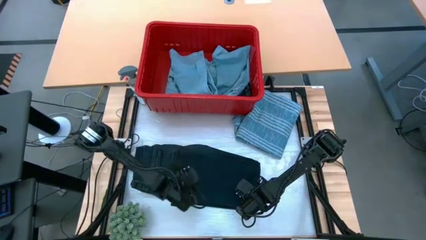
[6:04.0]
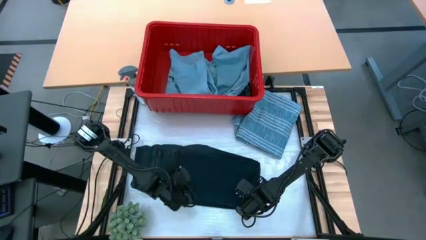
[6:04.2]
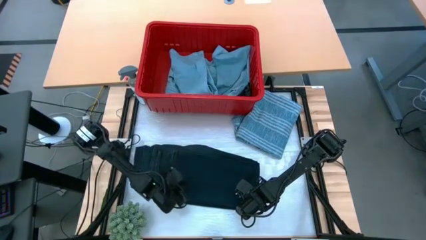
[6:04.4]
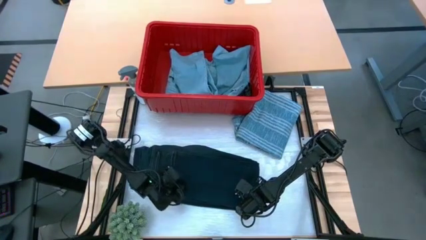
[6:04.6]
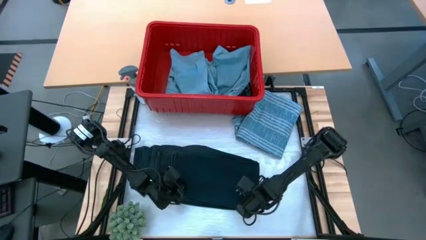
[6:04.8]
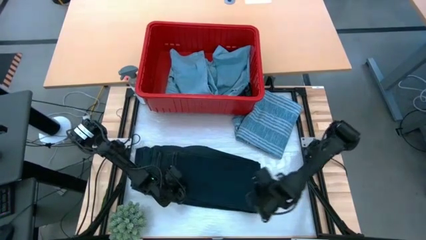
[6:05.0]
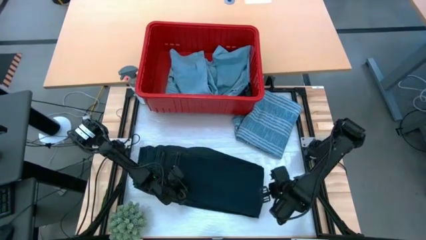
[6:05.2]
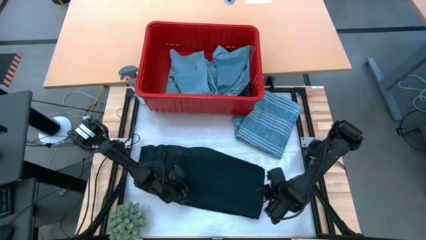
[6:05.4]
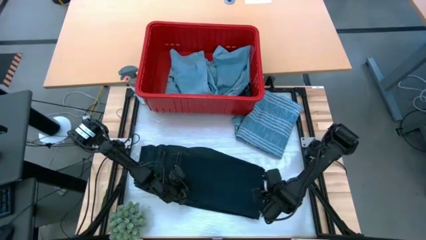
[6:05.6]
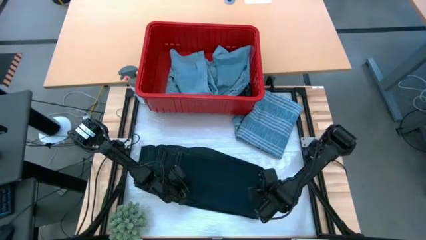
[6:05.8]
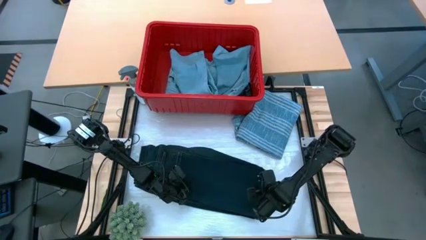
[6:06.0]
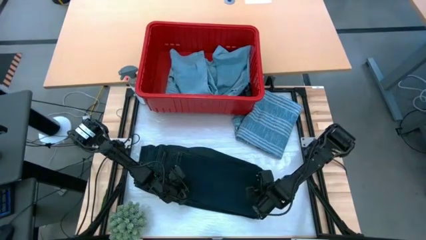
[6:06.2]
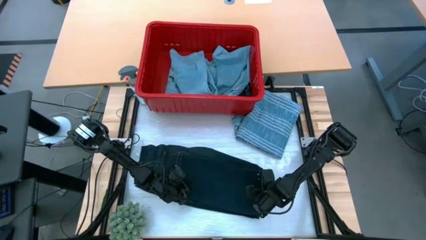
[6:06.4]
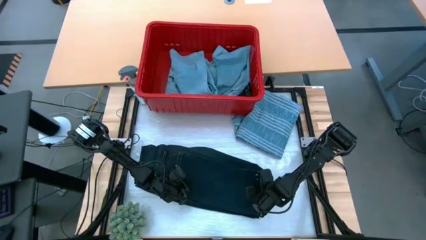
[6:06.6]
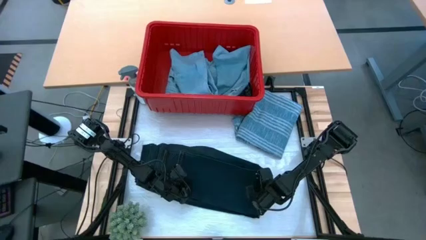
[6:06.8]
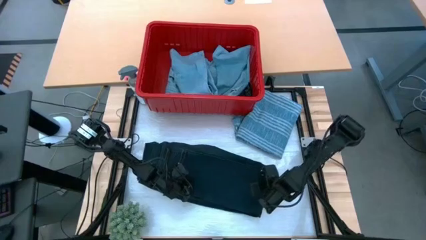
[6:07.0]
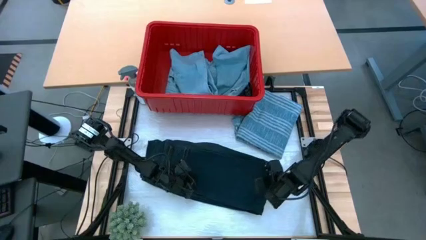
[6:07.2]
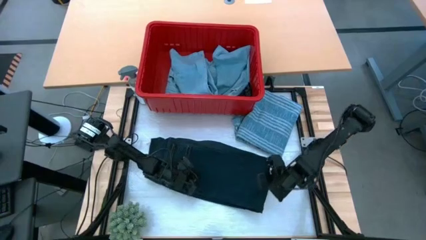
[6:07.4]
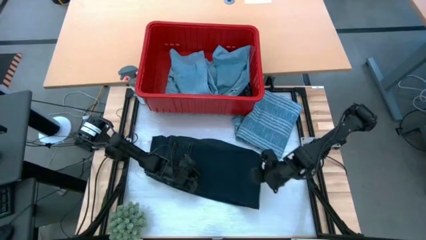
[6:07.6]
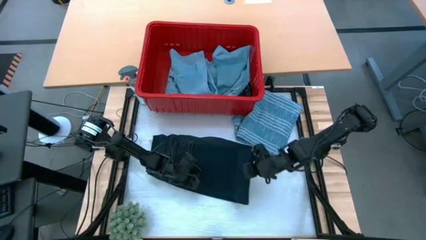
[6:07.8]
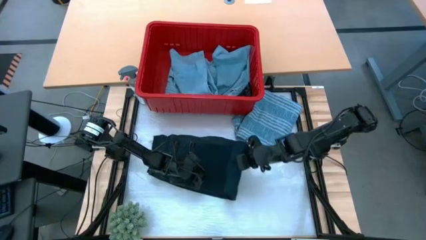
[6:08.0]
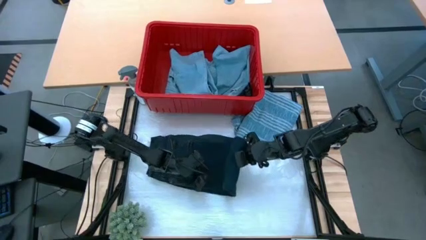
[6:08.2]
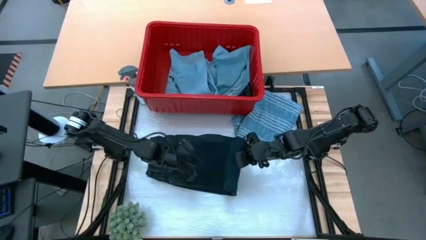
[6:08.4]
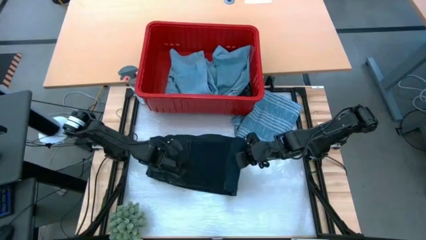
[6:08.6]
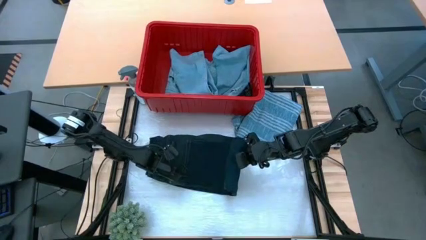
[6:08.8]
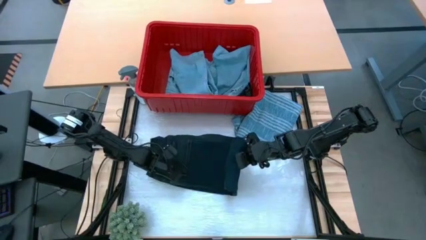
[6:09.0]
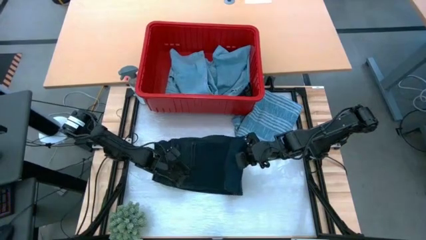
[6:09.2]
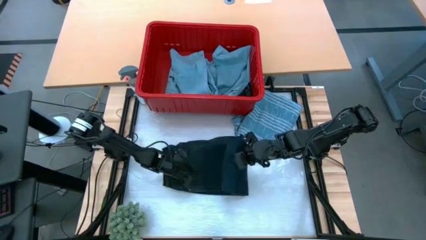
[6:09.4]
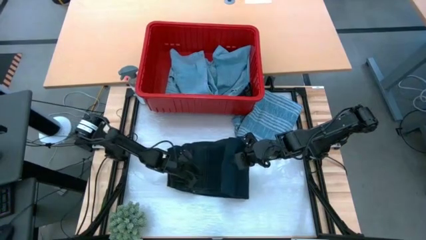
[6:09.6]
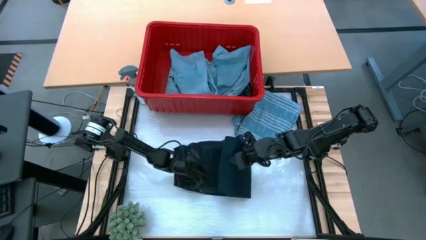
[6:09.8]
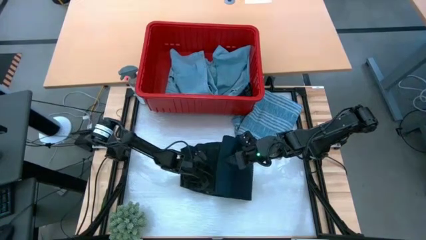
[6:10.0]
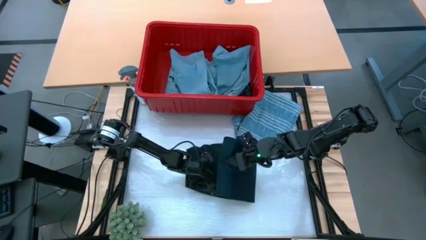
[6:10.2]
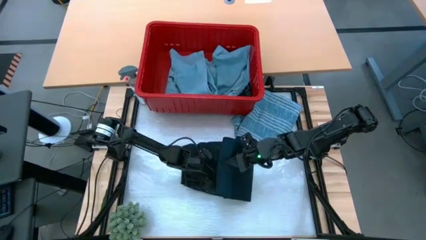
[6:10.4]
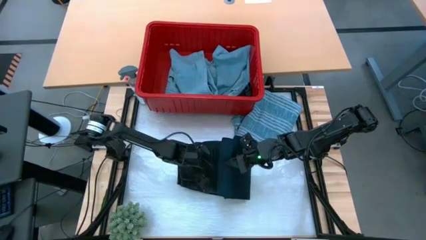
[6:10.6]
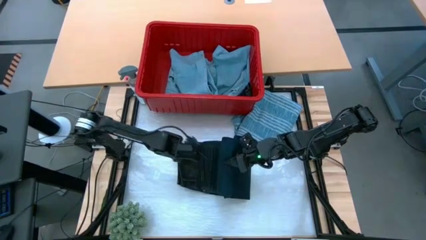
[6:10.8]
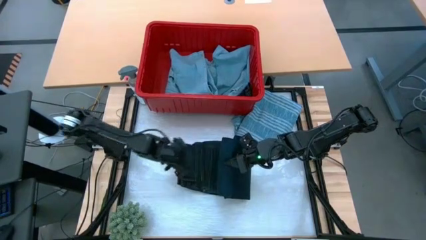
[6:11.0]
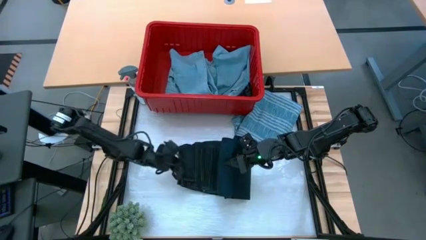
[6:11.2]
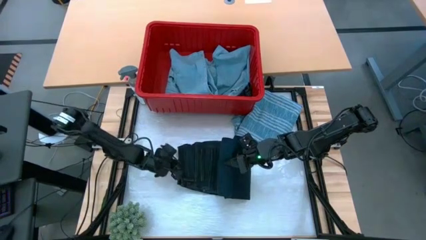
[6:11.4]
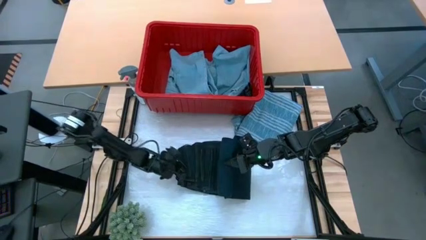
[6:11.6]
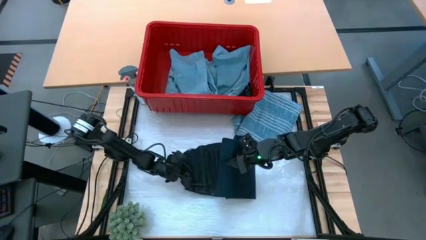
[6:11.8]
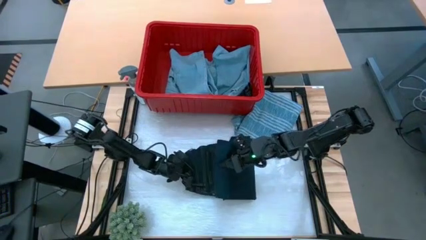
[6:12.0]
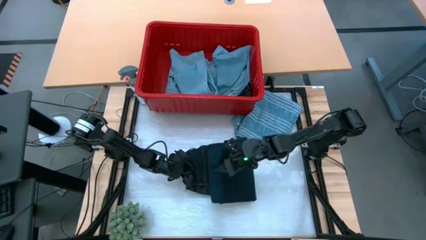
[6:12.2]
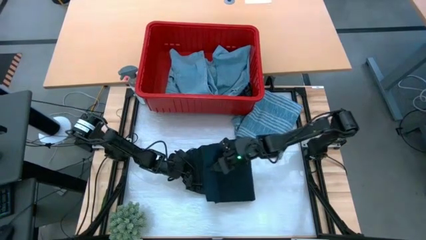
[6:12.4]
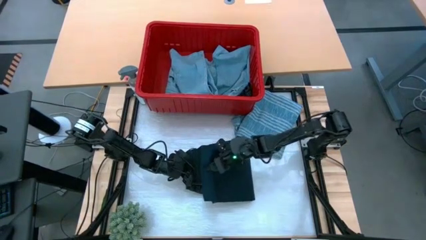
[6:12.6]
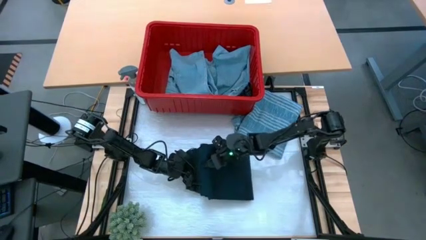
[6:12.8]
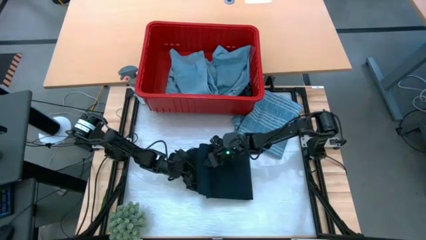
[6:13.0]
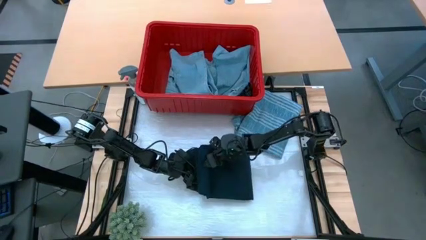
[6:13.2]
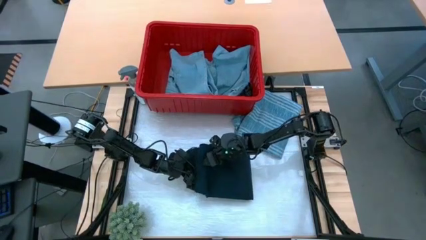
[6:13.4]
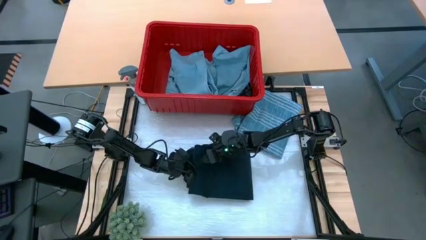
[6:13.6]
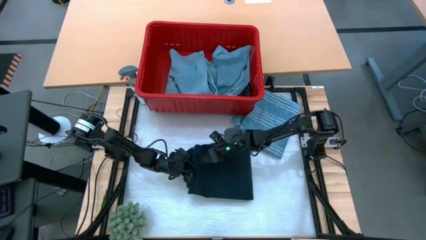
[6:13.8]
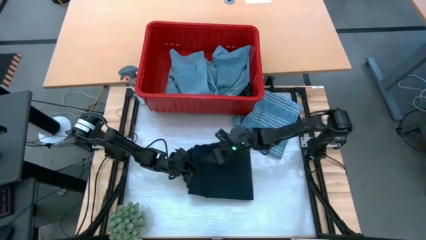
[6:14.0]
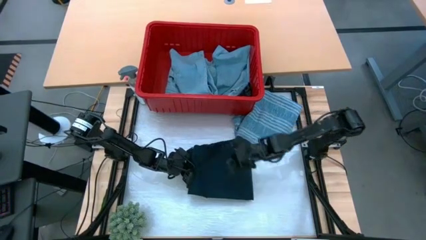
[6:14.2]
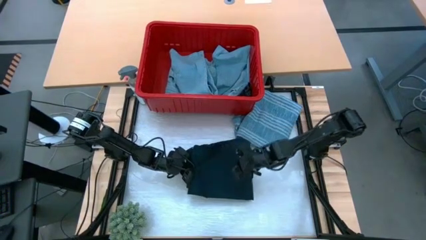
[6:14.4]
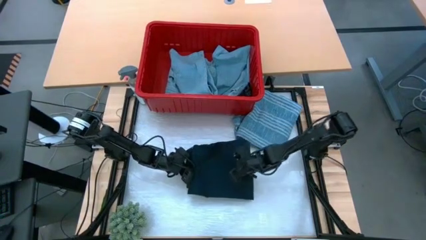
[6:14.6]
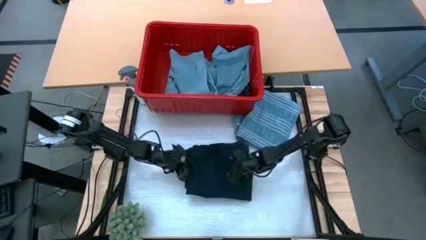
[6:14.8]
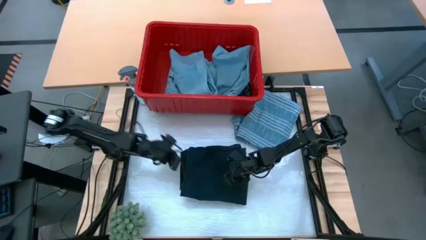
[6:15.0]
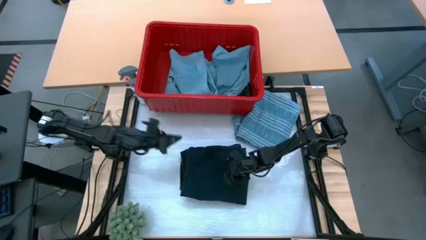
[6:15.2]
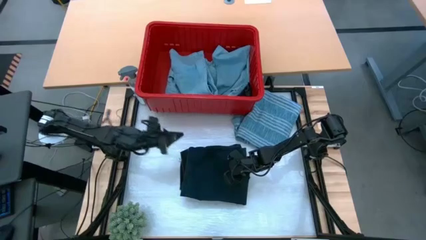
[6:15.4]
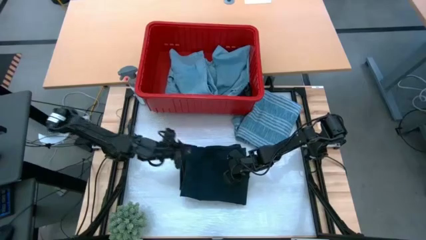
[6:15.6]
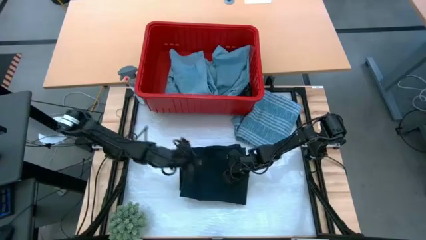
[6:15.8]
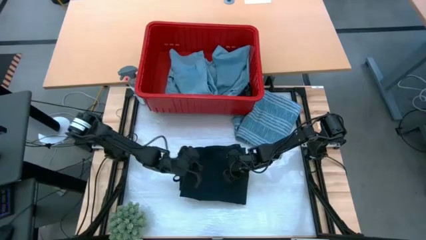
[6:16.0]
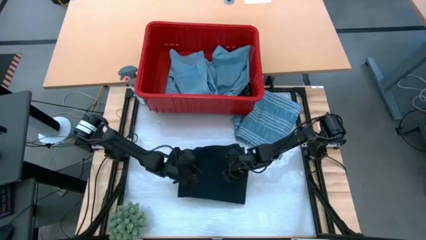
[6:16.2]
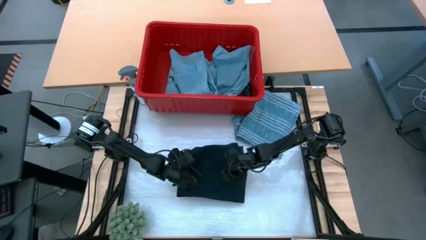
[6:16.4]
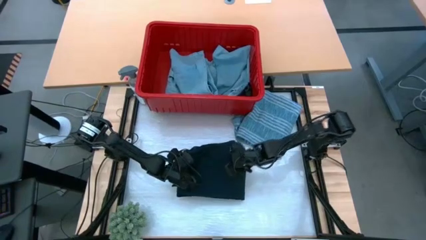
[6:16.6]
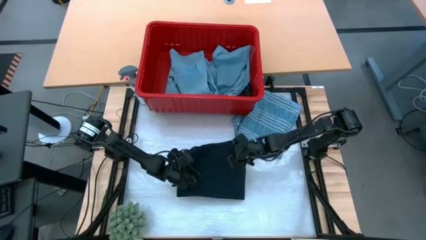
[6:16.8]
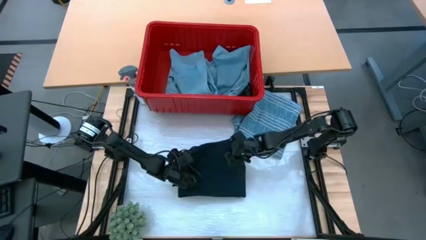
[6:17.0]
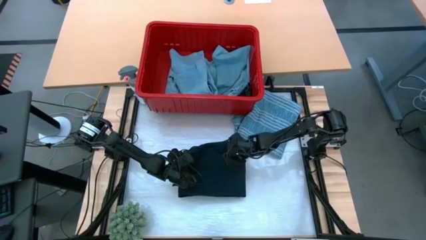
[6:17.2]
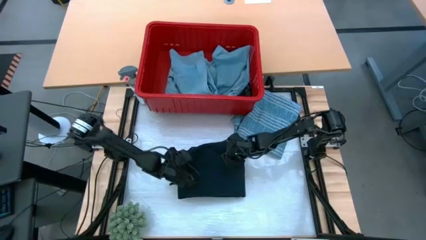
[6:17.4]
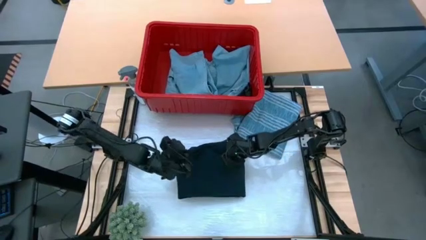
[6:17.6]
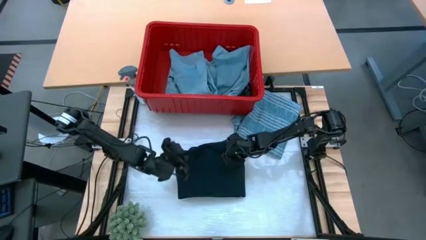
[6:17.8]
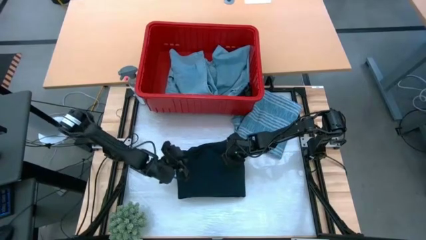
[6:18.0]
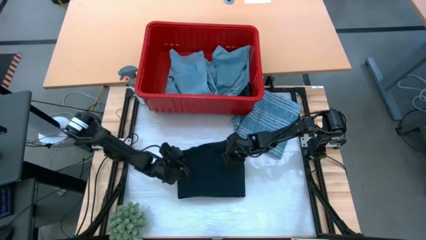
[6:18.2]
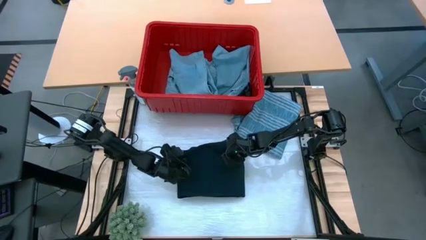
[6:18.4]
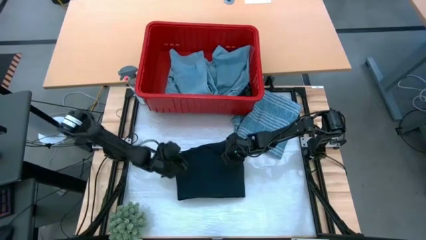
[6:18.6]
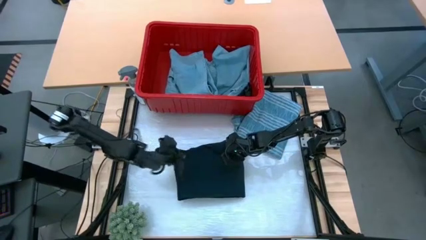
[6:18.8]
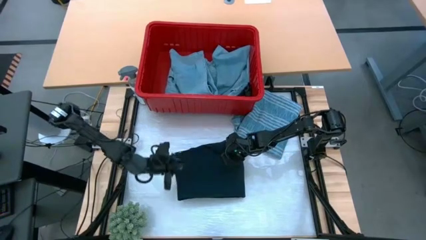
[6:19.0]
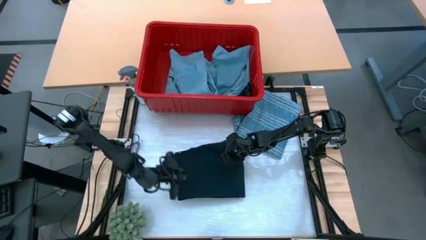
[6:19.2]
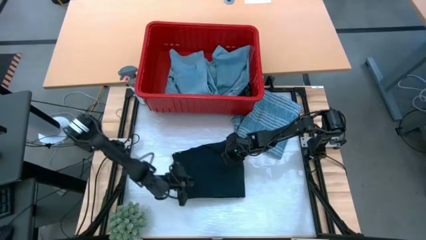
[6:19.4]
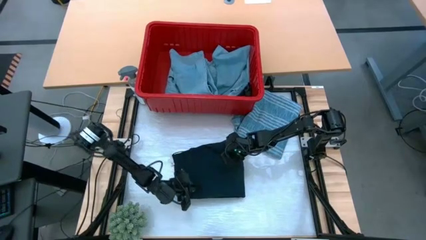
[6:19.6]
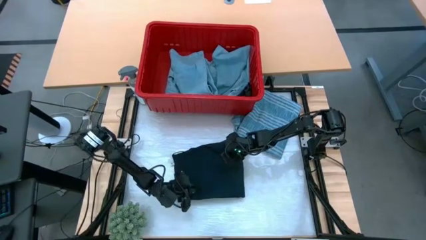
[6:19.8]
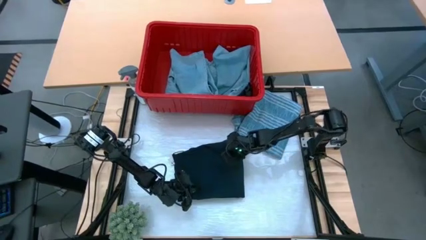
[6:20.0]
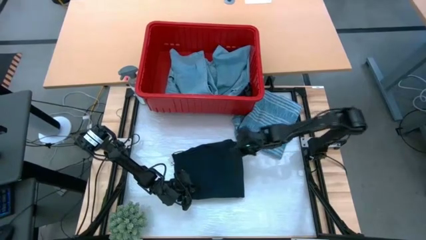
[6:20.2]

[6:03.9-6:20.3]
Task: Fold Laundry from Bin
Fold the black pants
